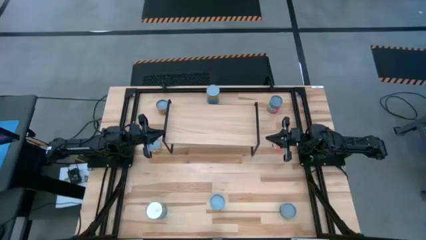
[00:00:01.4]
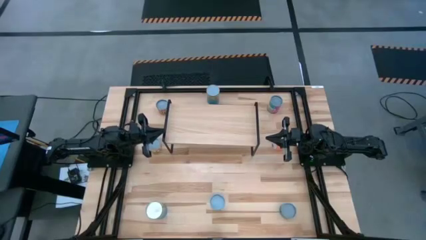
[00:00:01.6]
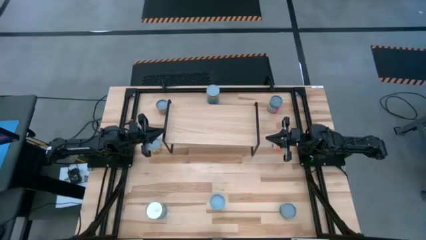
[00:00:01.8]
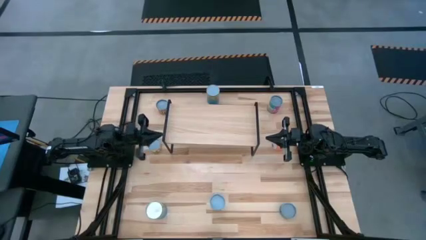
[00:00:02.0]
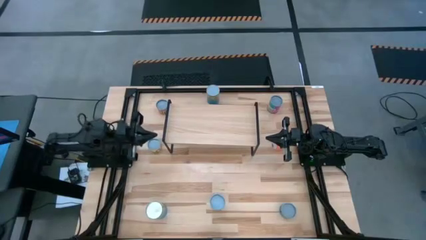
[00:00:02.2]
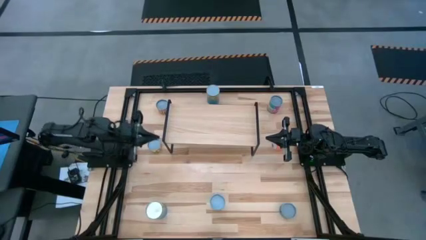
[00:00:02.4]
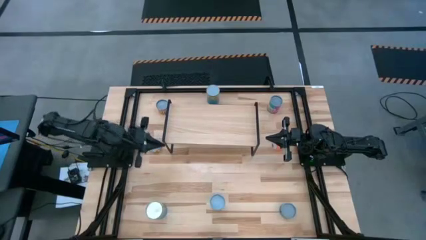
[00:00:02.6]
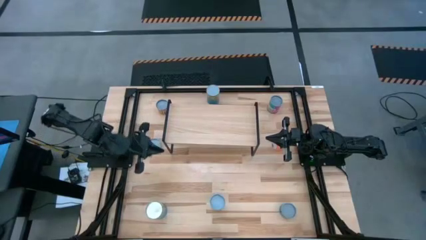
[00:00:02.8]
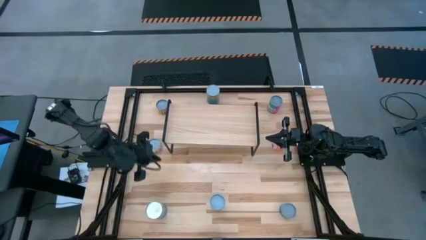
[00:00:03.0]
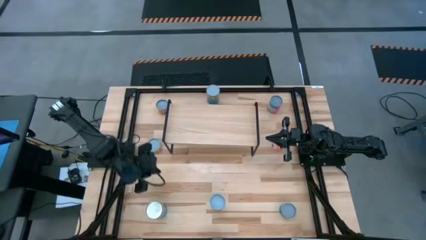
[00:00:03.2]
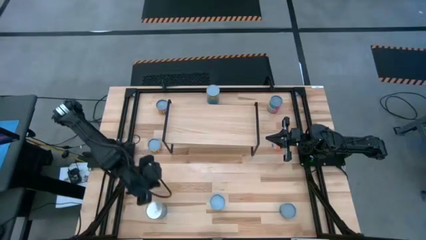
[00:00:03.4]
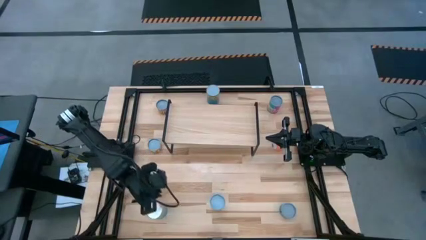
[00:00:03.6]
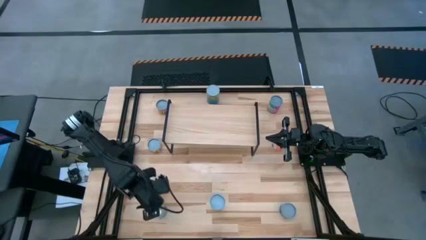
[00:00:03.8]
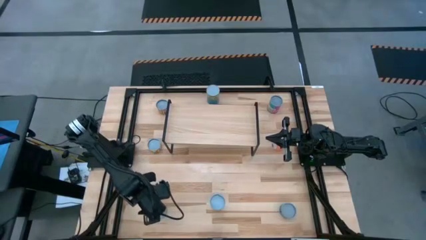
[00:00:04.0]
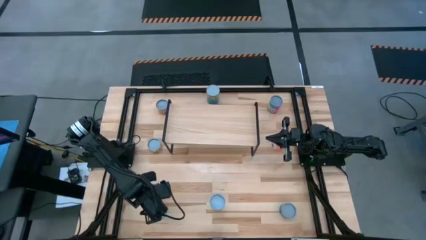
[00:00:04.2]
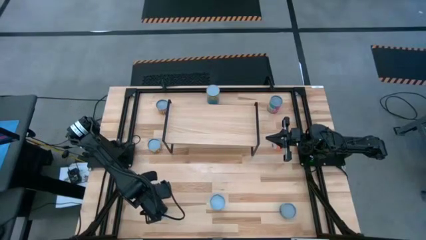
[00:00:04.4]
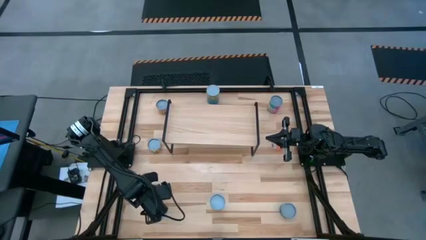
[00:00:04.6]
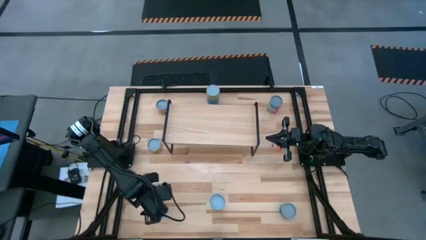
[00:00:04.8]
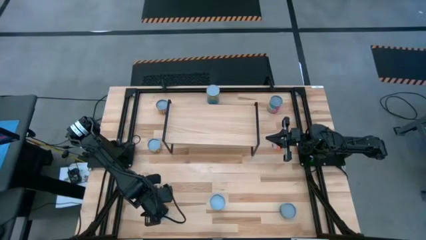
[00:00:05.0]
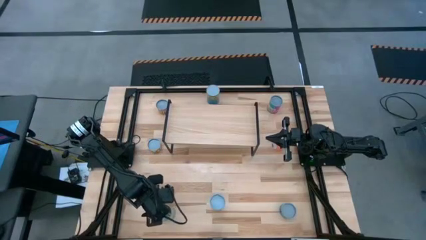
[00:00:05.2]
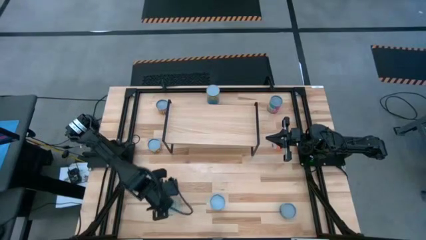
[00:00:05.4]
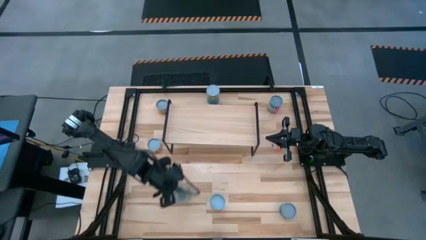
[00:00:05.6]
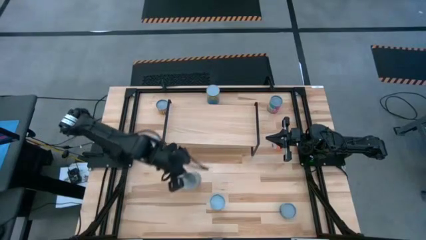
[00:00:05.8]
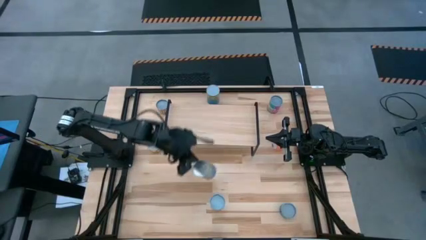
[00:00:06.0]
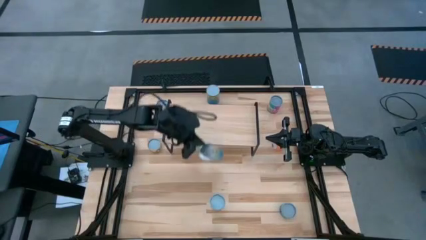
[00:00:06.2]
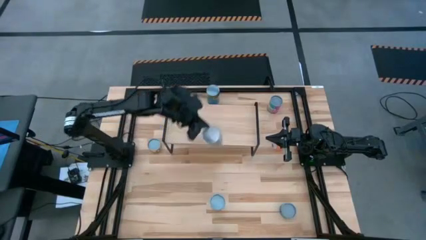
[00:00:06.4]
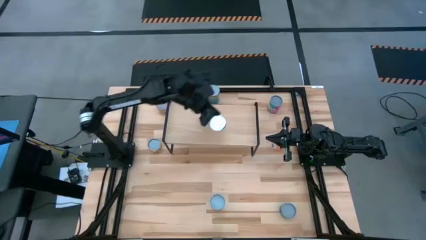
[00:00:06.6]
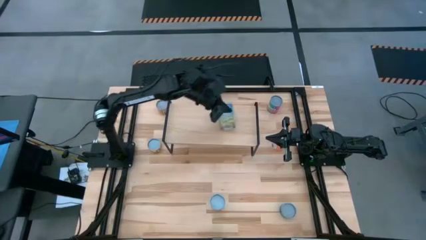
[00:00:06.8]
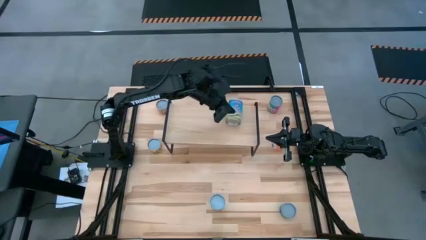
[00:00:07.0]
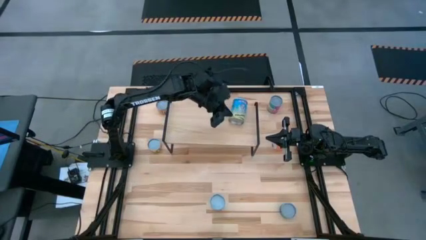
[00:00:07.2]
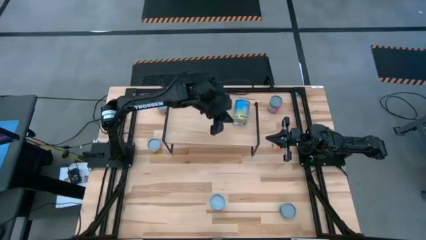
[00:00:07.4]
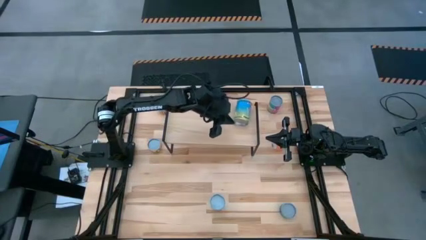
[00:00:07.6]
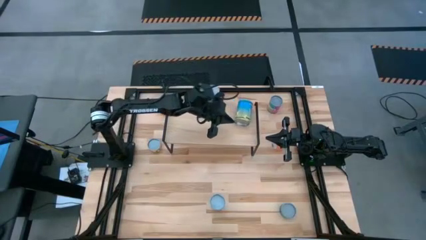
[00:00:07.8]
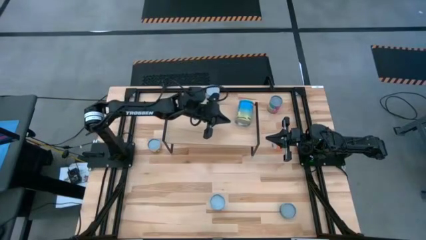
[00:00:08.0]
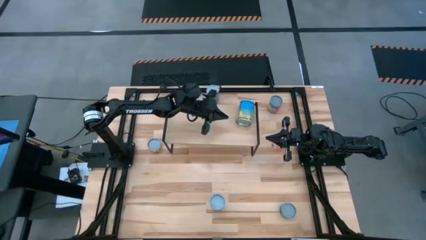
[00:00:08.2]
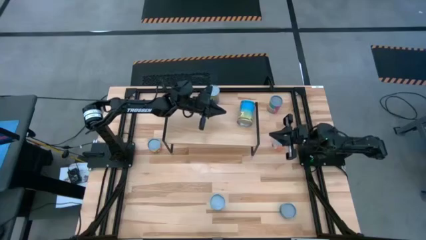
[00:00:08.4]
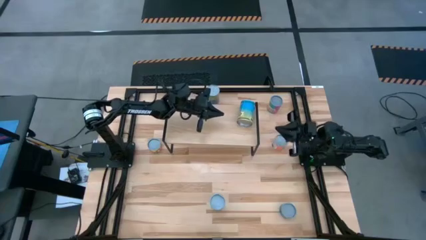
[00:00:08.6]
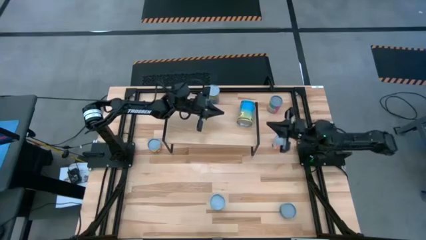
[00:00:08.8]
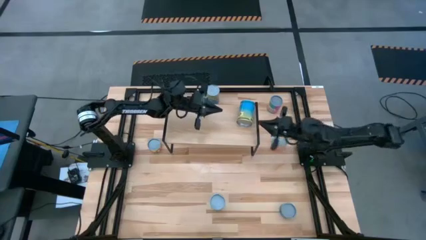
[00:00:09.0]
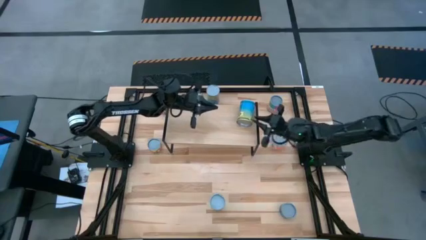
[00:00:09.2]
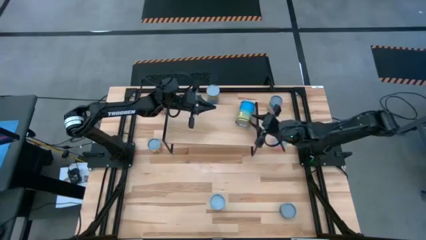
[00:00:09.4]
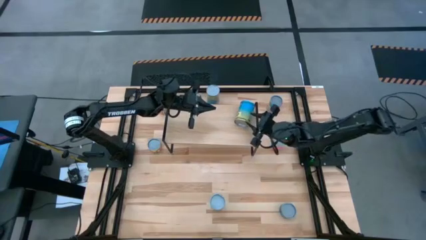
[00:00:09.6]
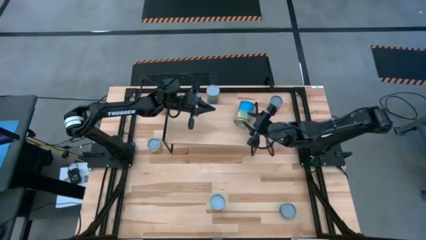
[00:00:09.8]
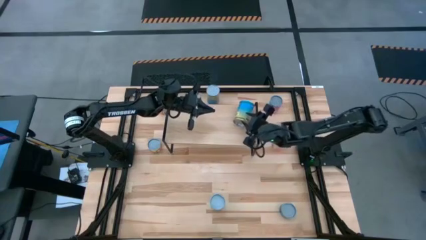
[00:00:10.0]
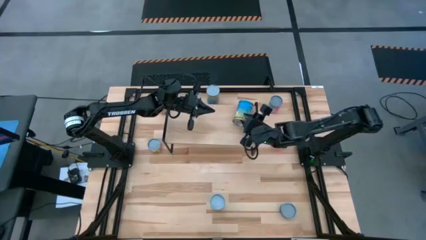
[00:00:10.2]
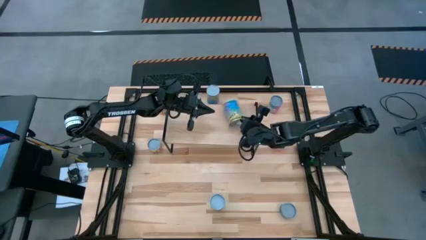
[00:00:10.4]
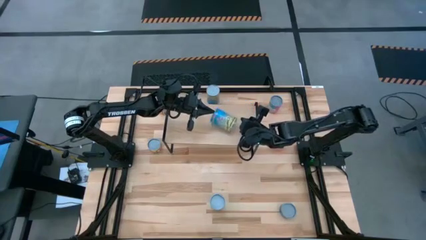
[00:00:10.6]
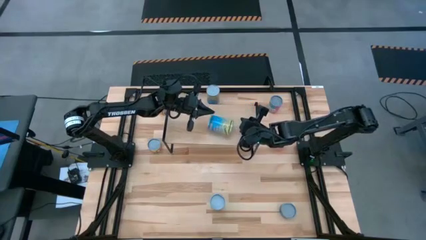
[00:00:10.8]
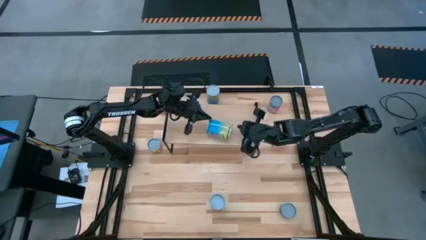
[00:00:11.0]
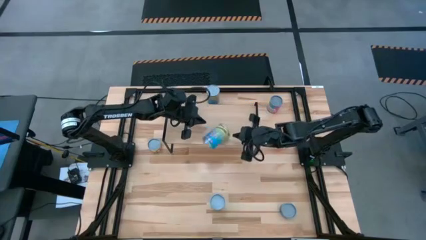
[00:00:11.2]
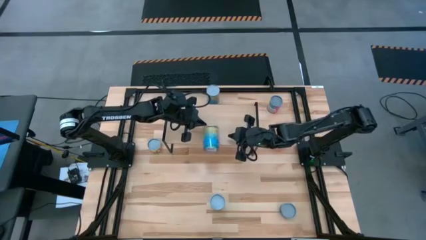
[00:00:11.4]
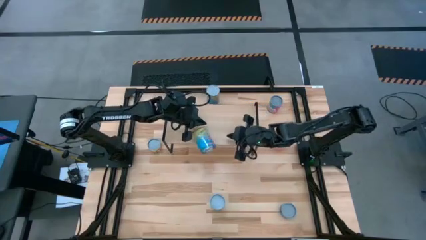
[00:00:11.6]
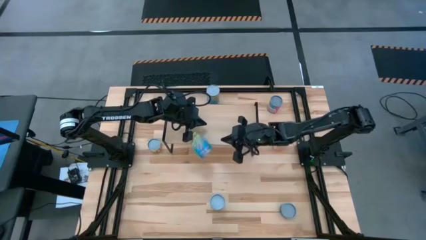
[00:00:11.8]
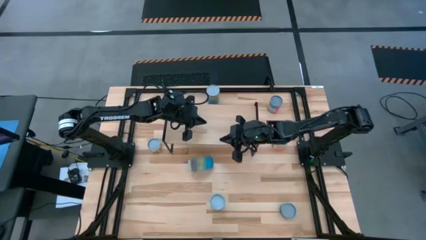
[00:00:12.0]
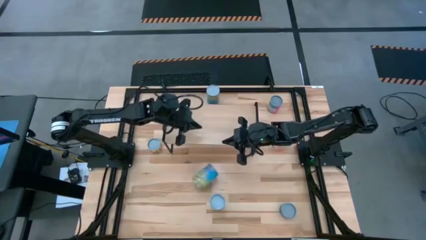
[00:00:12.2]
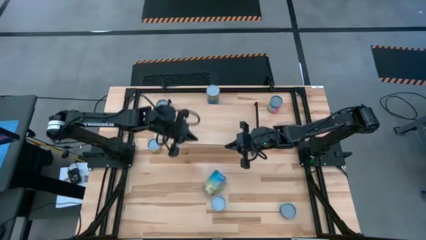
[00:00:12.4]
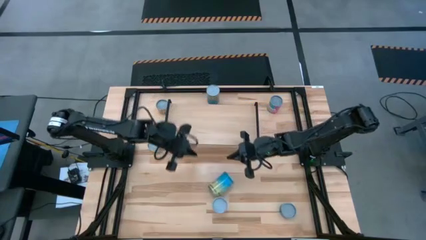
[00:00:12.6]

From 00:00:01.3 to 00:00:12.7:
Task: Pick and place cans onto a shelf
Put the bottom blue can on the shelf
